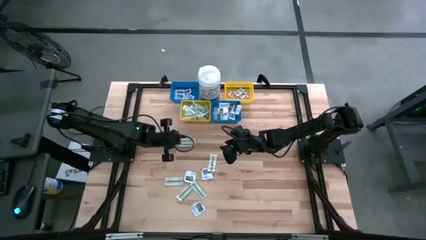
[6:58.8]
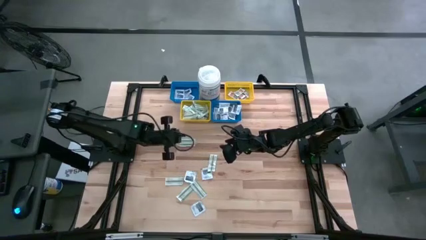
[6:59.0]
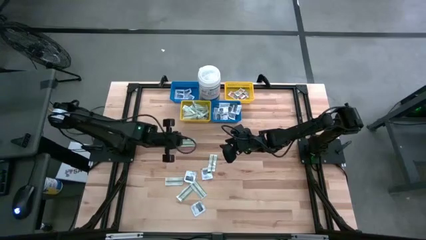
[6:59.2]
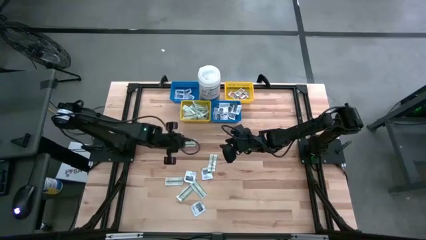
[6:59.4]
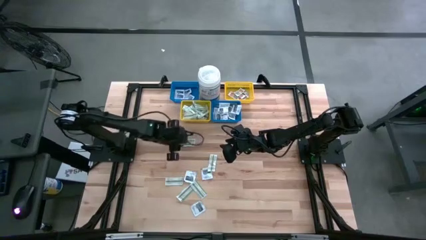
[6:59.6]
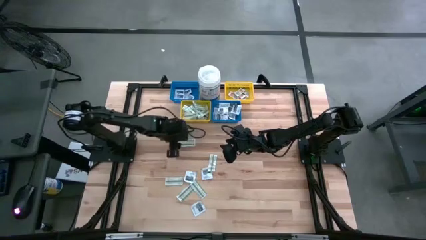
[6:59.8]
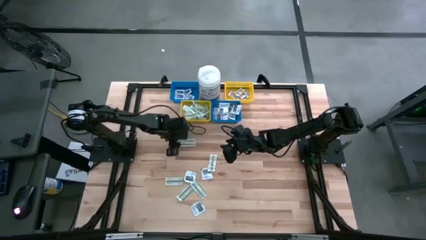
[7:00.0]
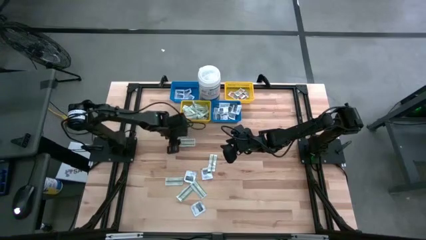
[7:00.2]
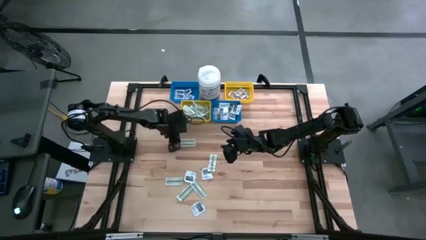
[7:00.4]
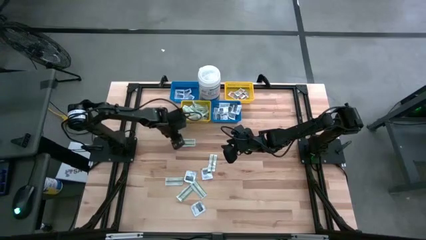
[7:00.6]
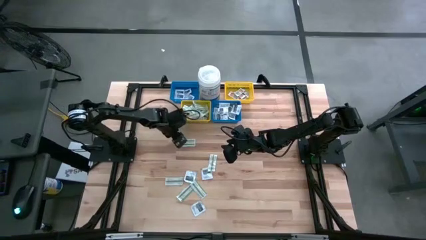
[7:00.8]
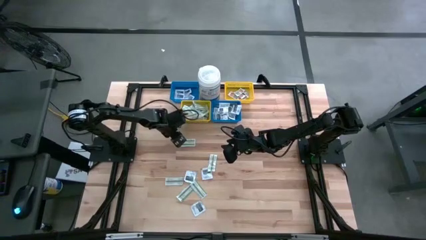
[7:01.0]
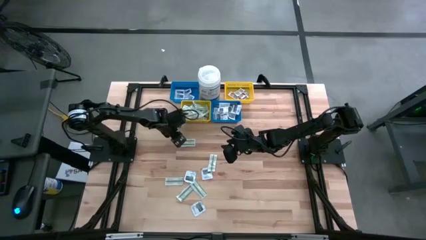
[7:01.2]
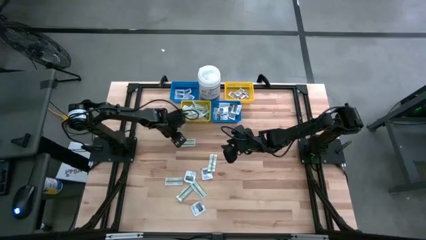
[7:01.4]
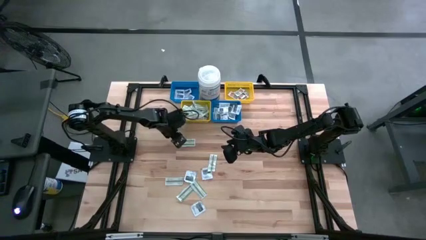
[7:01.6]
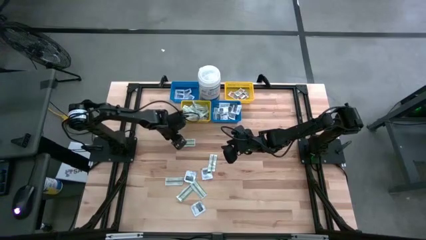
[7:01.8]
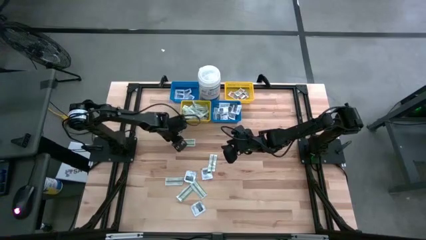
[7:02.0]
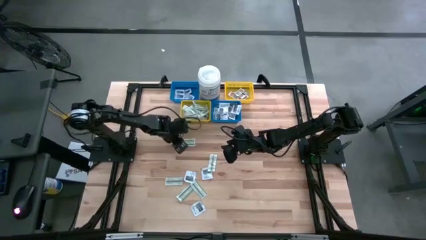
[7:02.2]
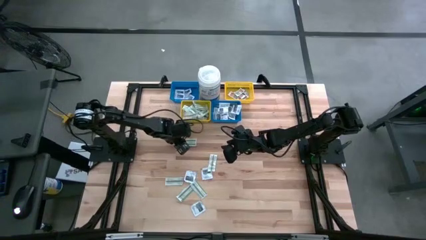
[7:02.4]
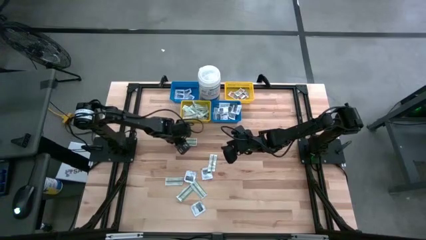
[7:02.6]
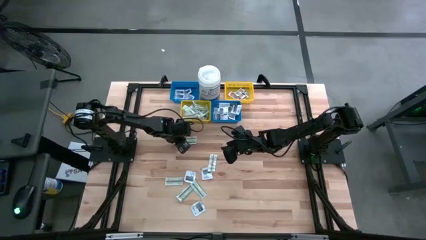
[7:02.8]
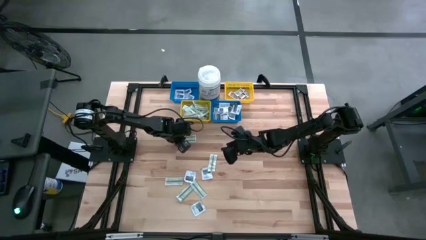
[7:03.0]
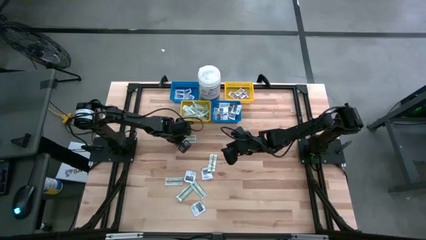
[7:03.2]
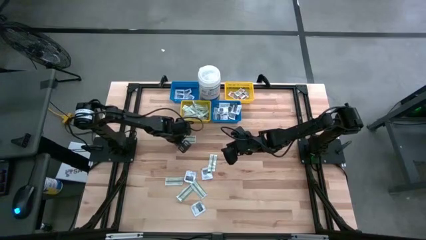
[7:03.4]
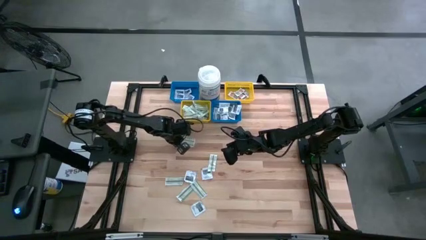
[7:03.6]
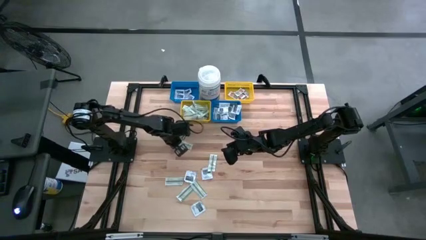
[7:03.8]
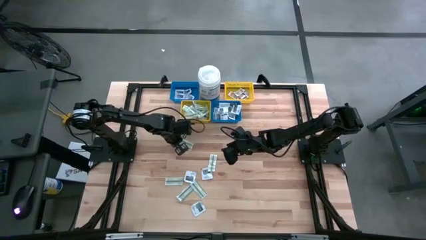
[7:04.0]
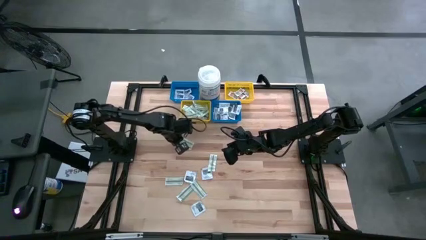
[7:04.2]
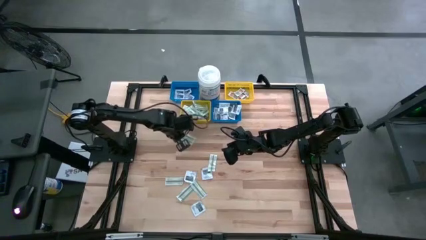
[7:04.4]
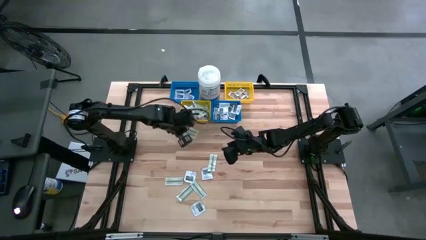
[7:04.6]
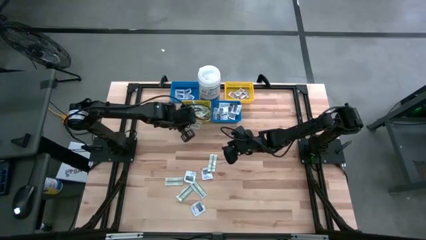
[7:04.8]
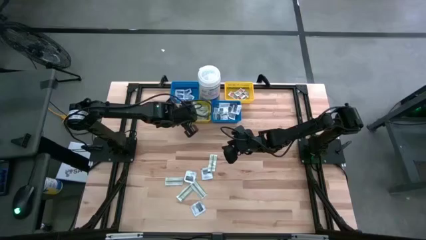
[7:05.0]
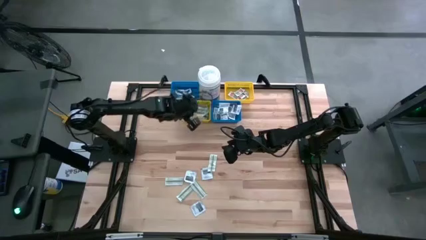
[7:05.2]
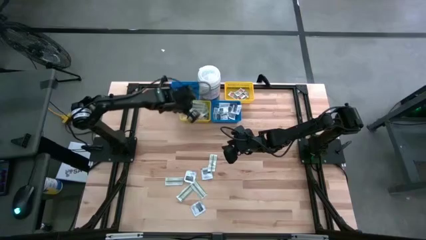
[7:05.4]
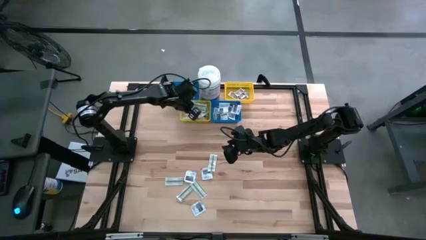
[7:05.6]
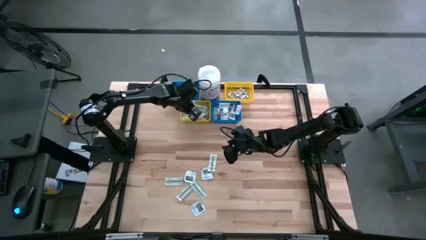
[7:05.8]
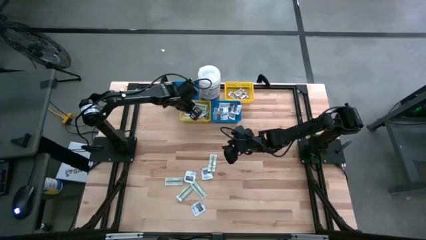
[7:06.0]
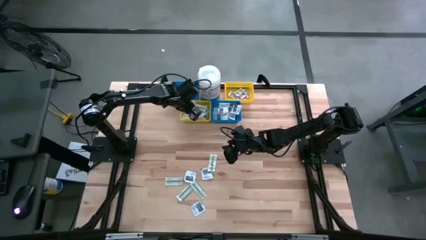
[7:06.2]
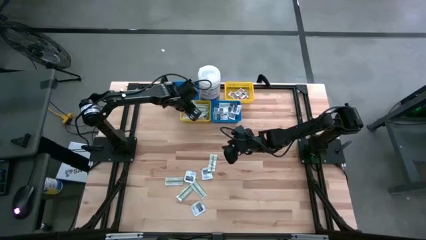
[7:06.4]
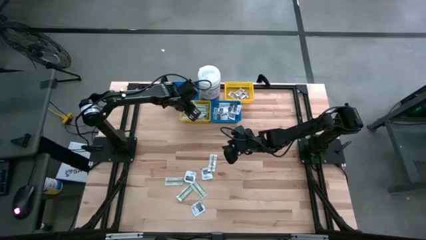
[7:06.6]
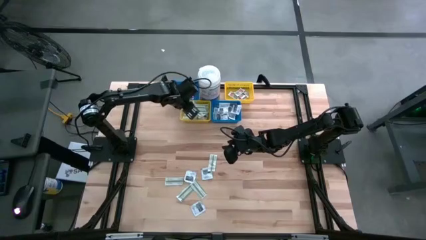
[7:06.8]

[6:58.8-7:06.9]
Task: Pick & Place First Aid Supplies
Put the green bandage pad into the left yellow bin

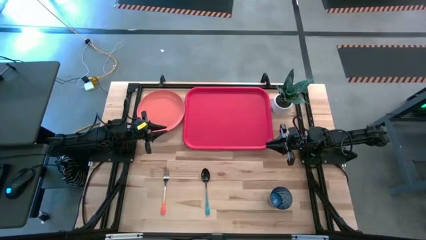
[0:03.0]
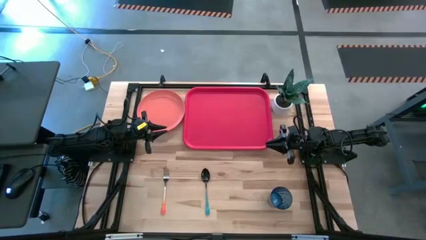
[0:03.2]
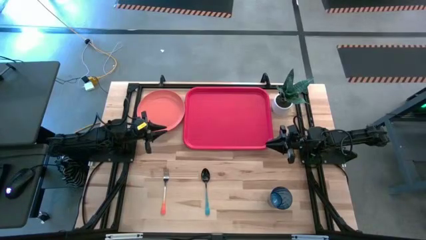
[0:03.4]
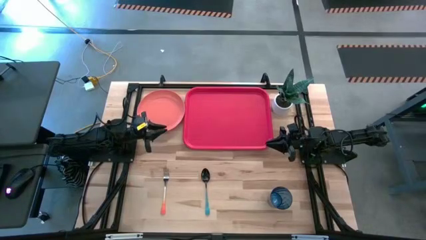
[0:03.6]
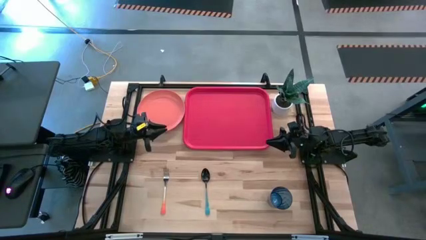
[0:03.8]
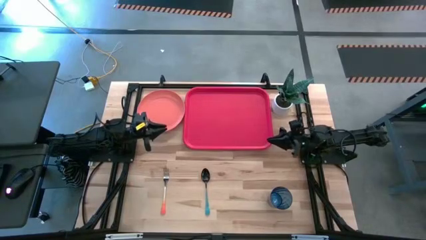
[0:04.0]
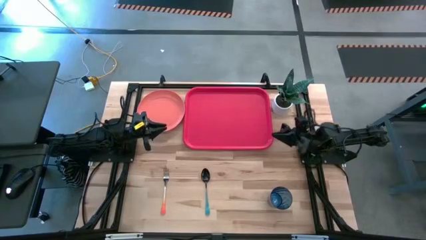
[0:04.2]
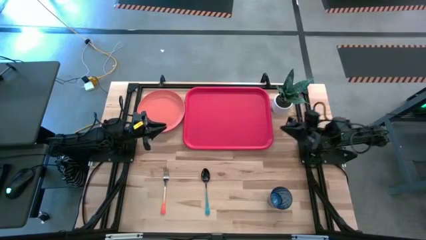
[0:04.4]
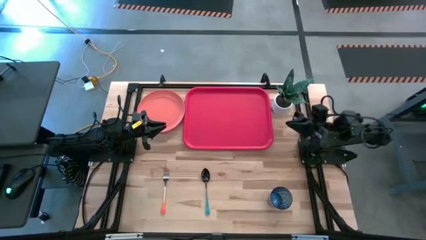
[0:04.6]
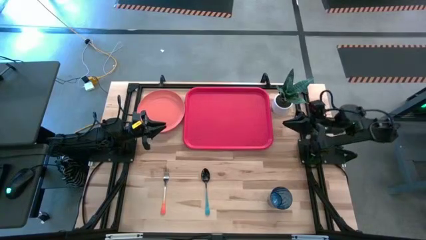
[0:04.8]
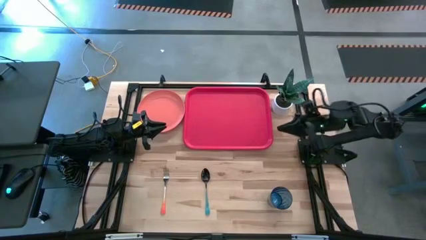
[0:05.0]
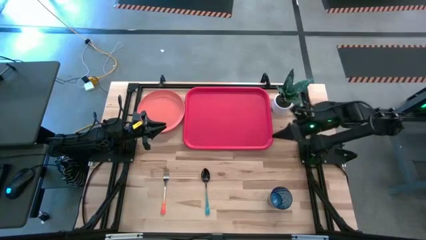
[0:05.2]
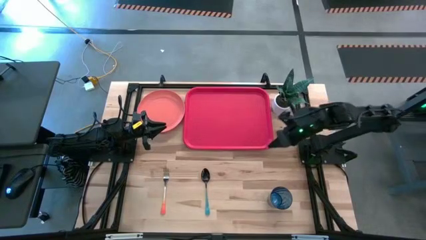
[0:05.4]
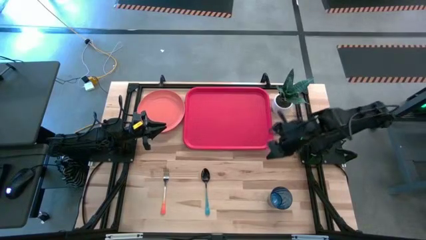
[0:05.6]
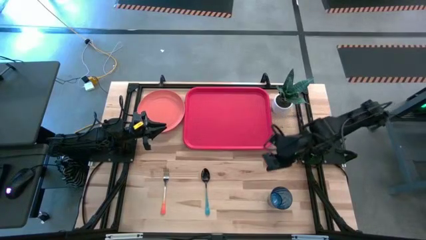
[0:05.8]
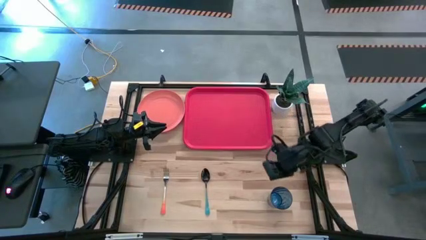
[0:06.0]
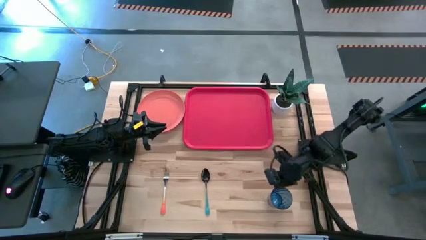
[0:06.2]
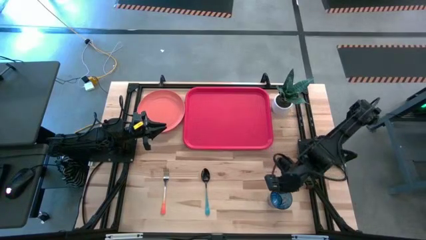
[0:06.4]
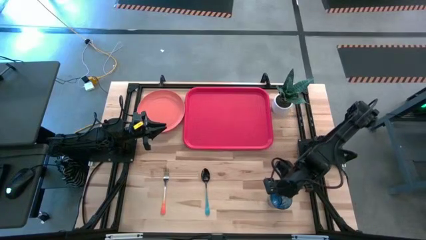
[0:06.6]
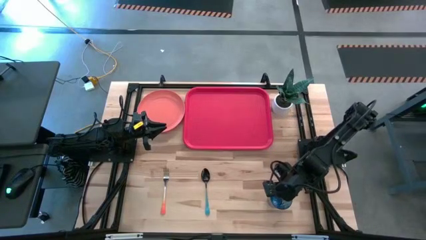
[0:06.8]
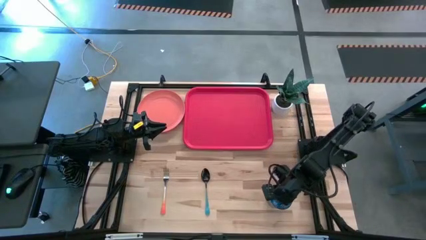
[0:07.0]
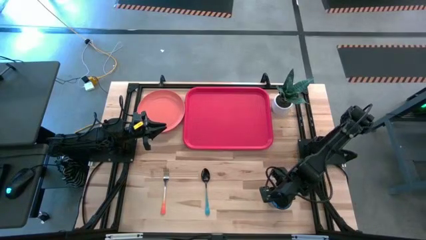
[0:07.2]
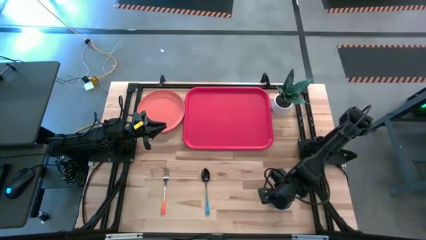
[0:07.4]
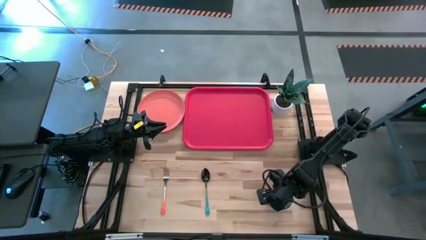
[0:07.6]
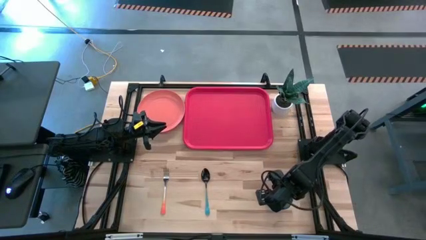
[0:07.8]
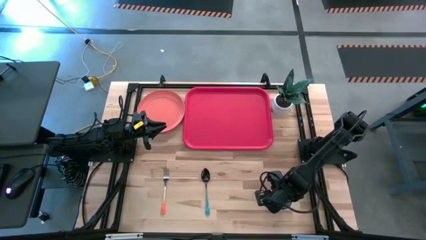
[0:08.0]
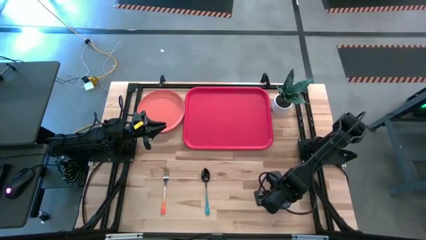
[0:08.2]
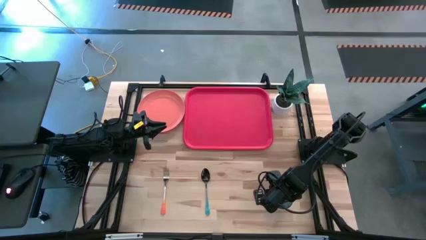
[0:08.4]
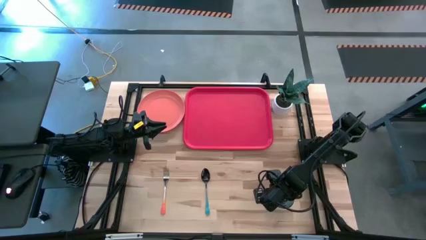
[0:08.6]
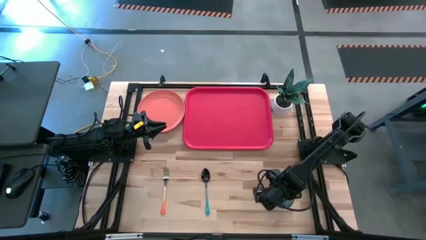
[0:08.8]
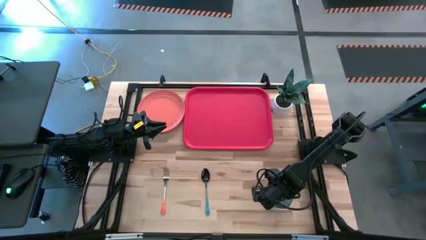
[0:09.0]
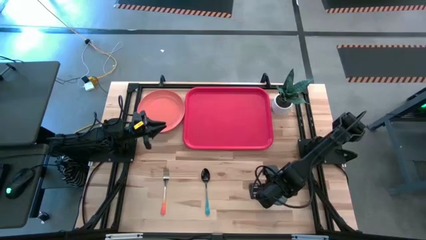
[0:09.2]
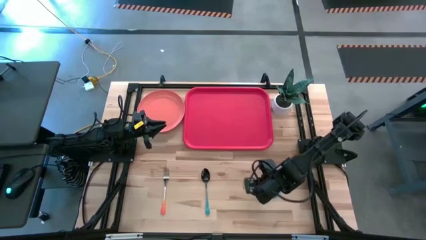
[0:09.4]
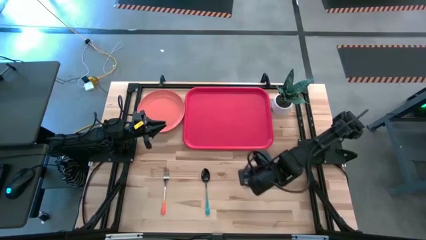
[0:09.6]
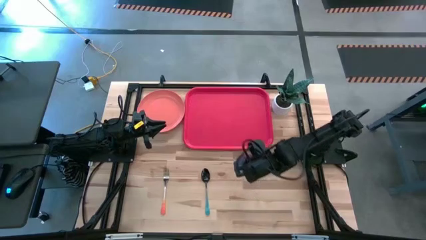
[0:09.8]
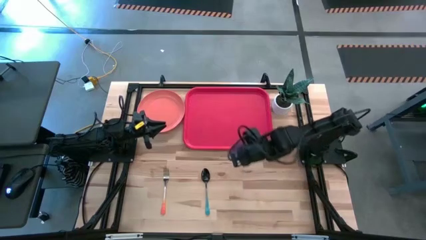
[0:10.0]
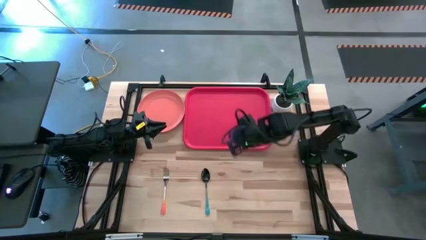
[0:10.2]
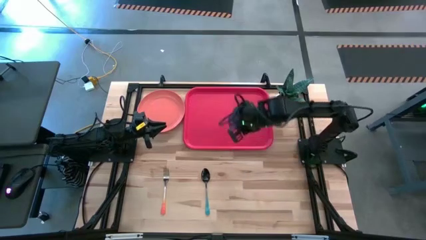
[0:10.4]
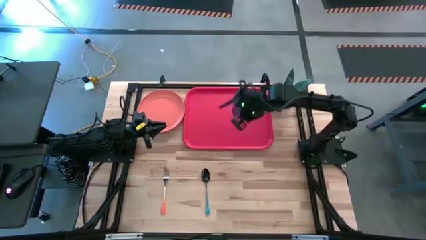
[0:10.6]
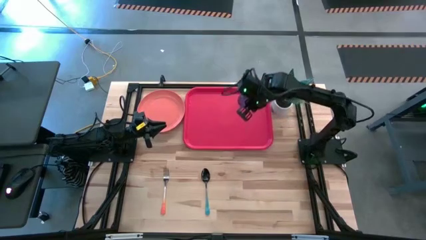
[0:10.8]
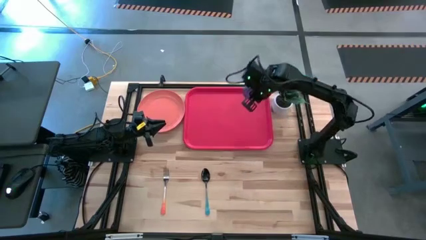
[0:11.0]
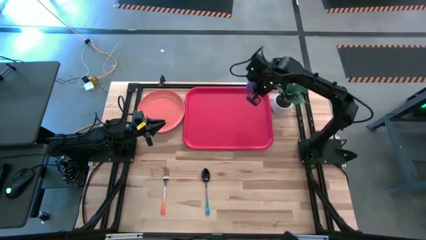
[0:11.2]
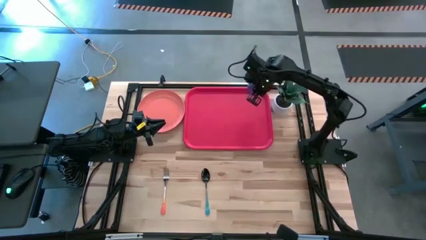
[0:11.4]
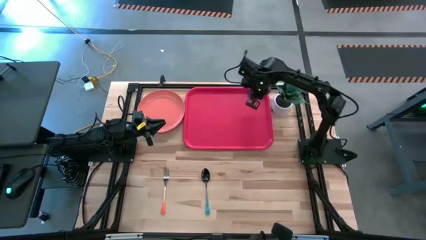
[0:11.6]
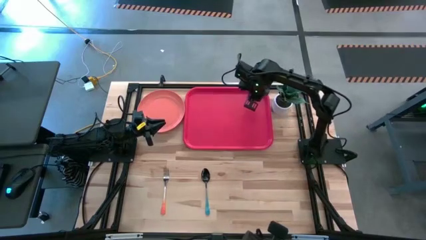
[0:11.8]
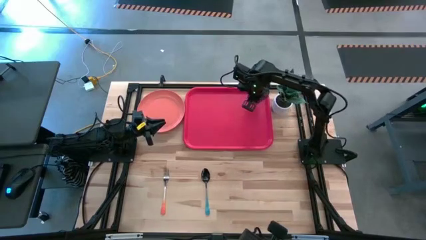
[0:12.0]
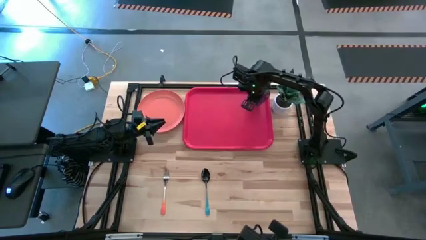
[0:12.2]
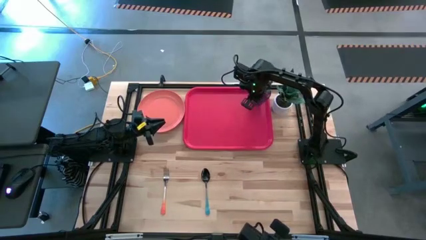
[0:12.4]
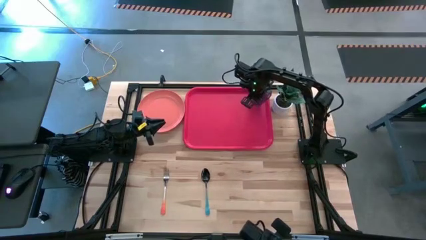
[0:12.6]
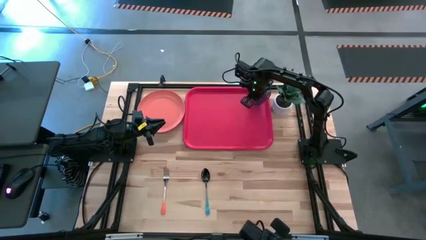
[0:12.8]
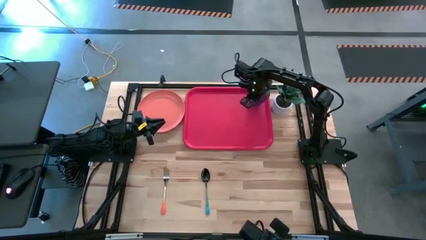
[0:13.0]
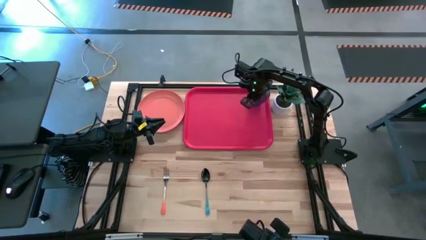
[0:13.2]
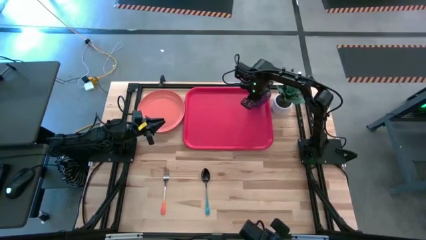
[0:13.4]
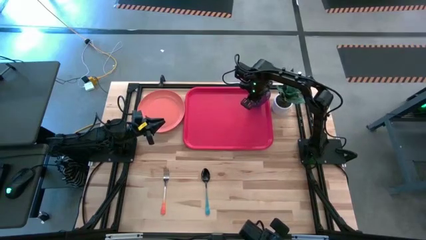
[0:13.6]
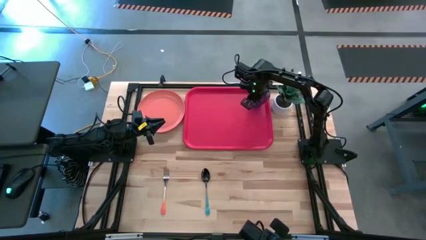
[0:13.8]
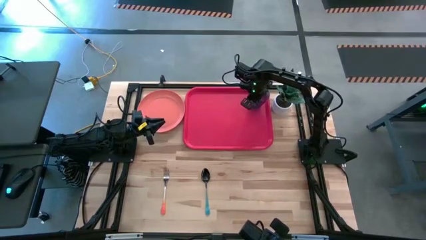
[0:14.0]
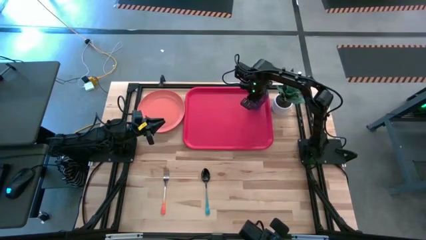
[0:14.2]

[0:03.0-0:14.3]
Task: Pick and place plate/cup/fork/spoon on tray
Put the cup on the top left of the serving tray
